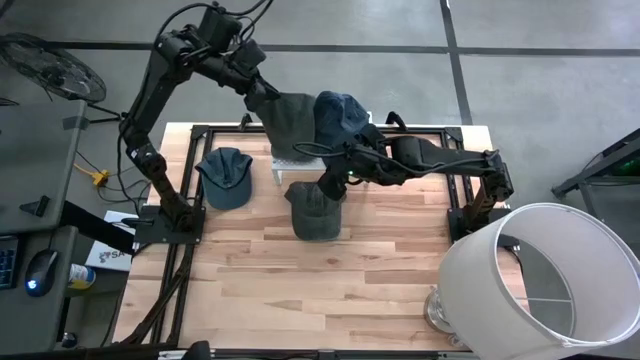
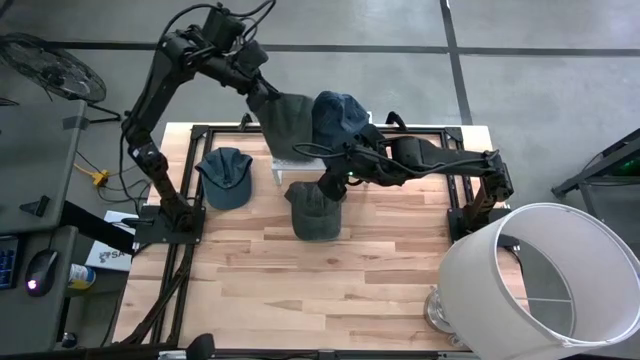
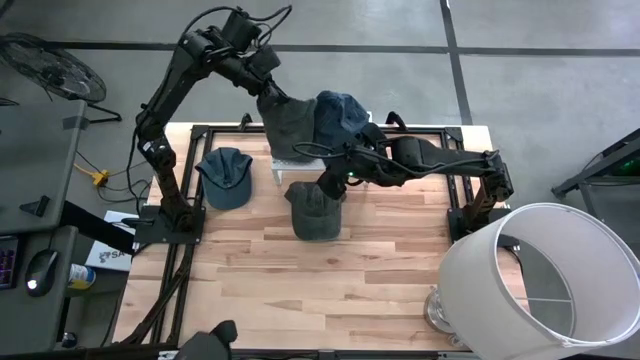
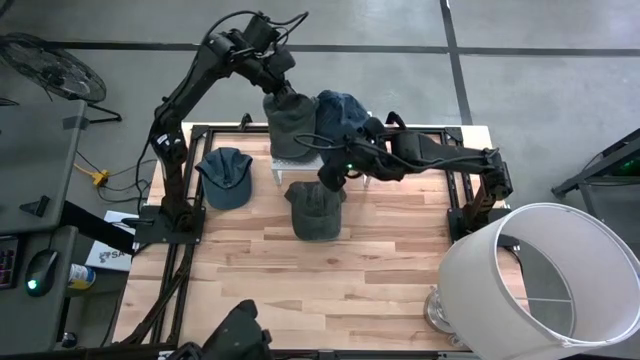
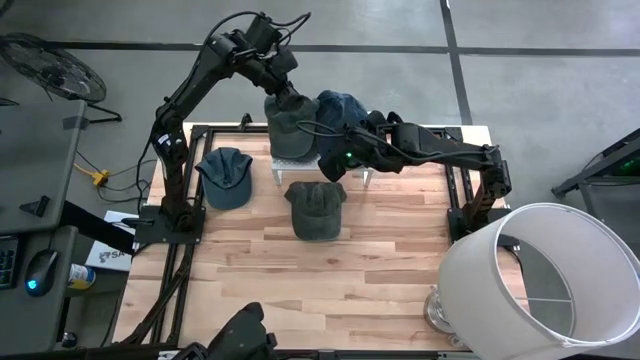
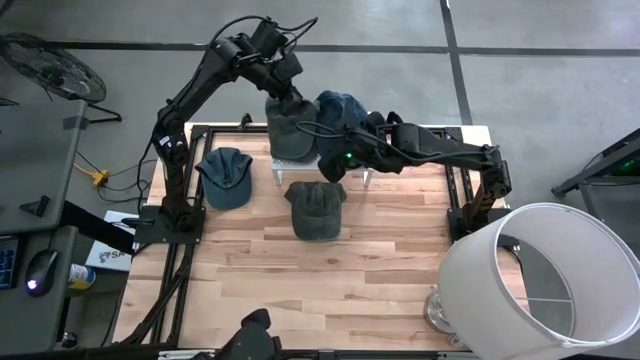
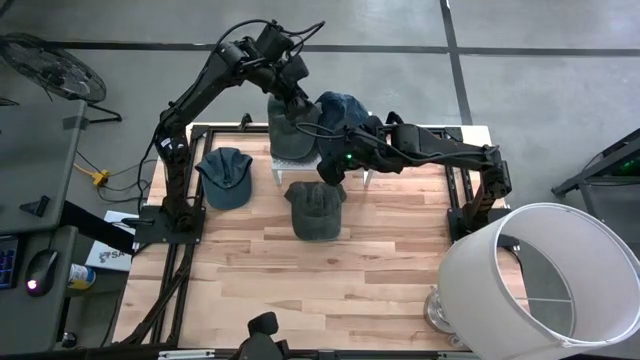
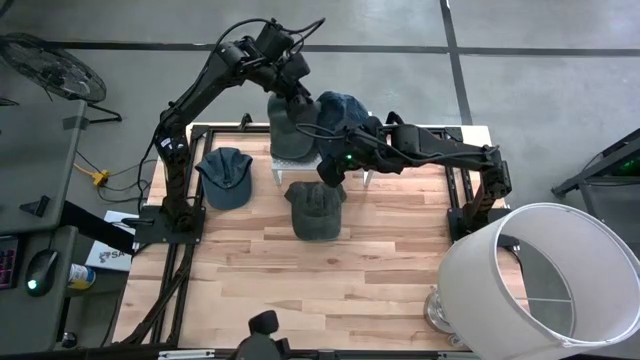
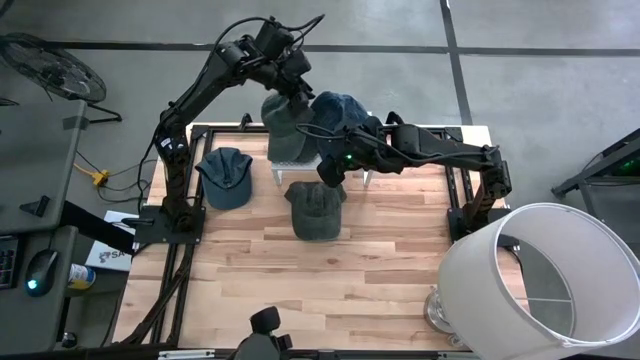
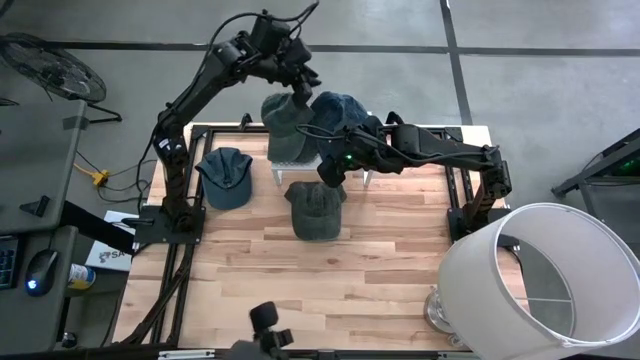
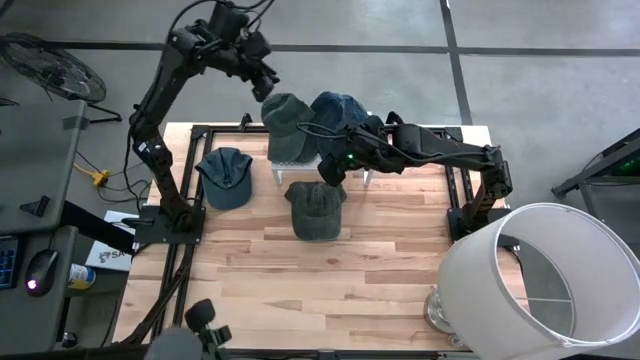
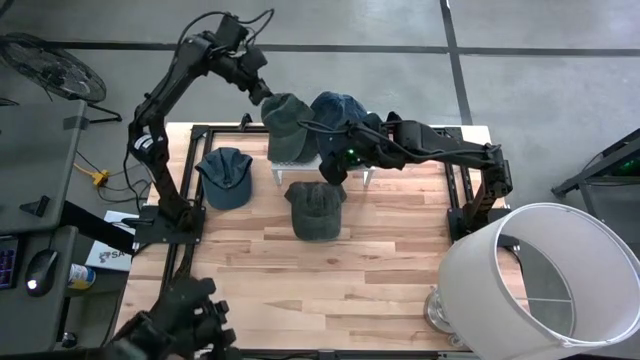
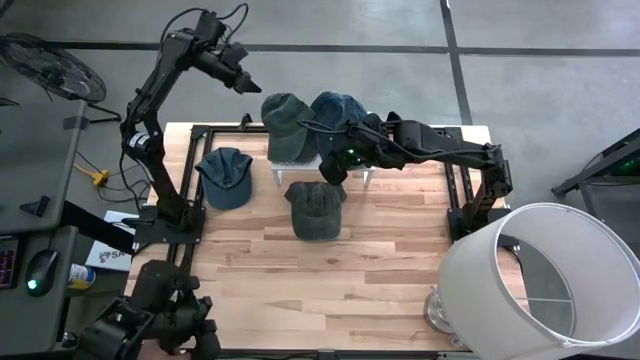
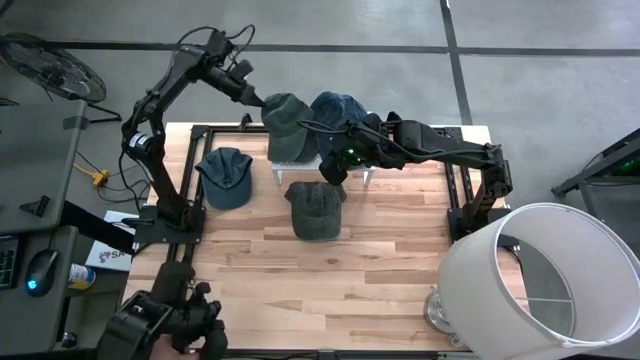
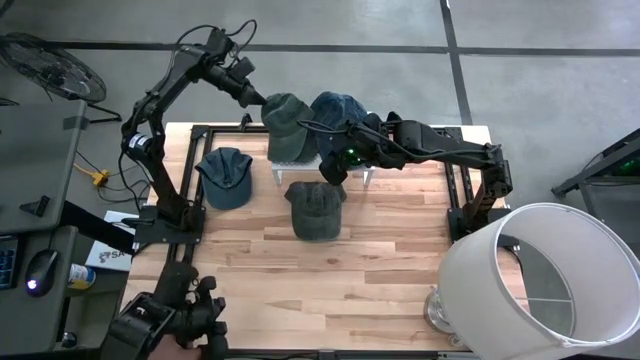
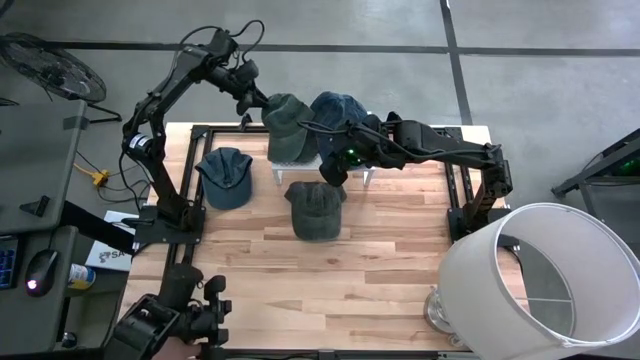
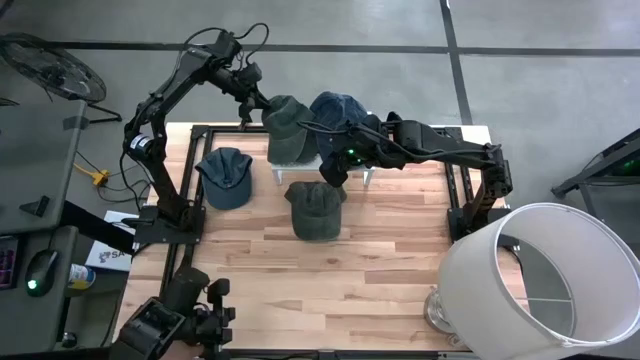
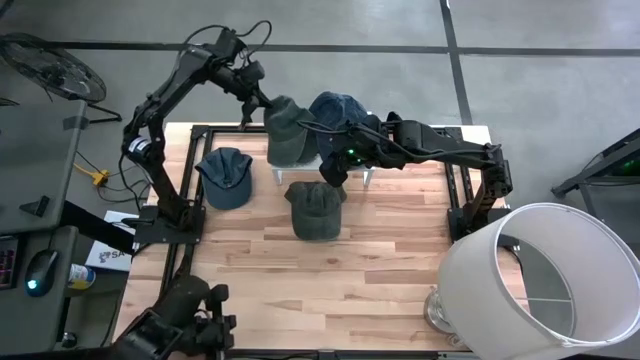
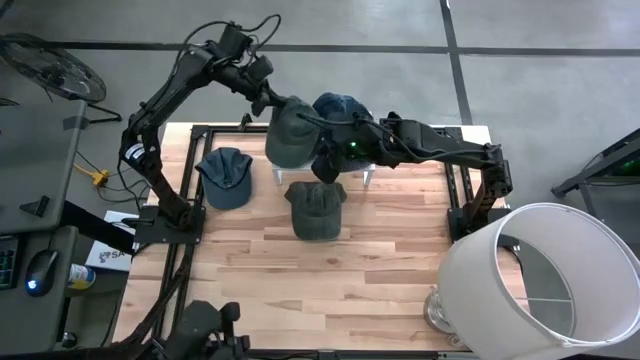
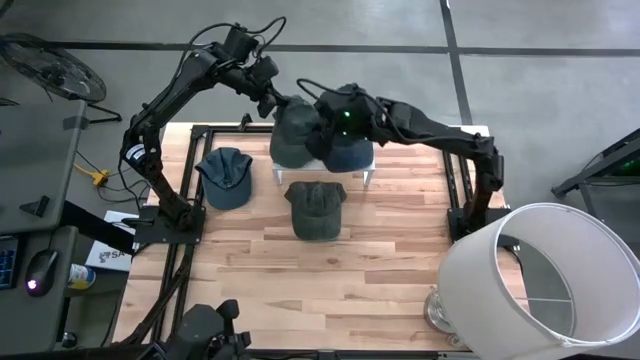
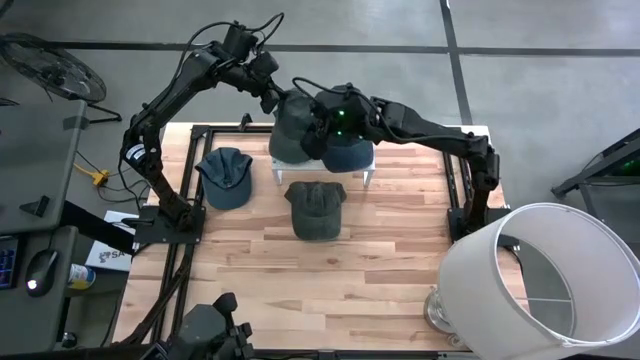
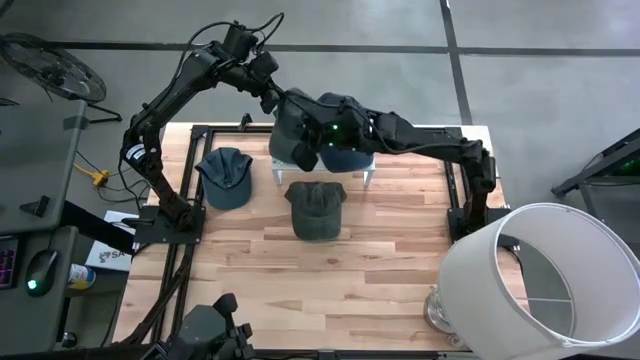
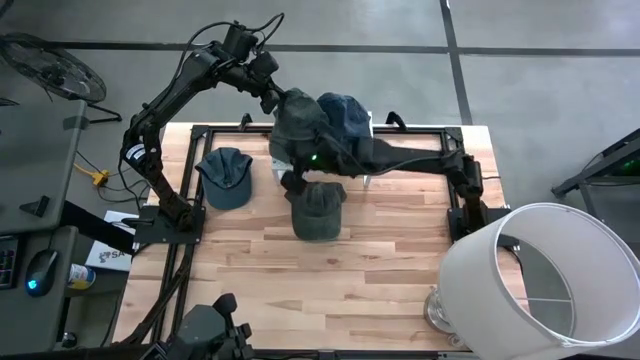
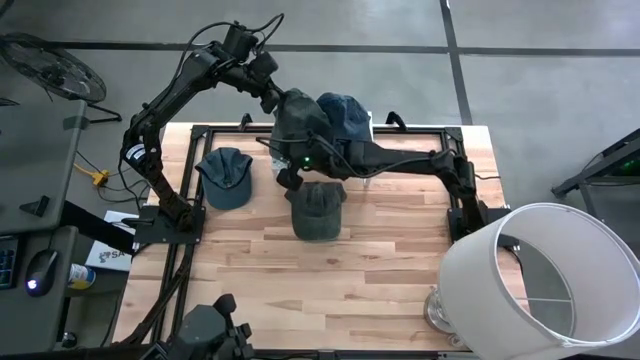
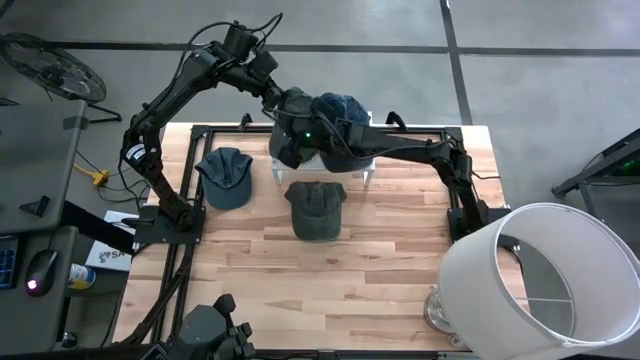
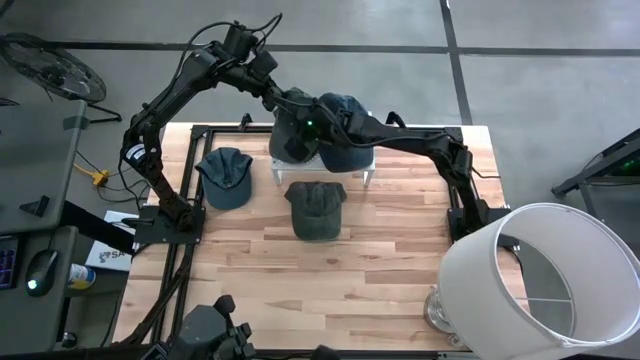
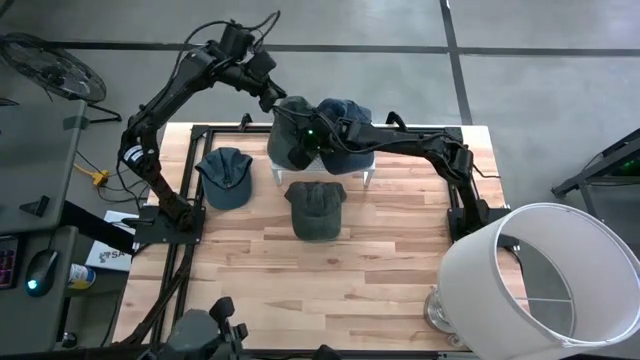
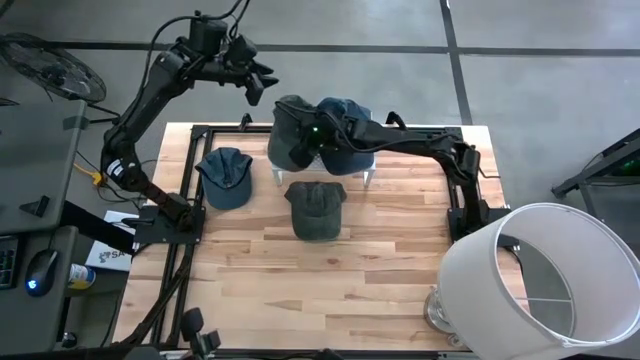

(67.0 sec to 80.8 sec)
Task: Pick & Place hat
Put the bottom gray cap on the shelf
